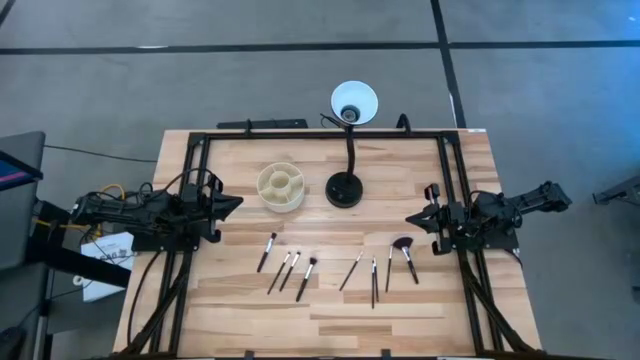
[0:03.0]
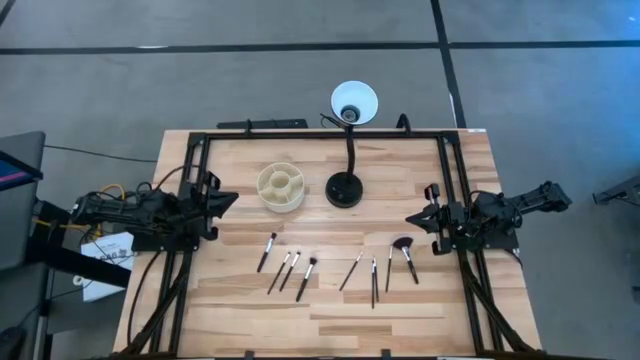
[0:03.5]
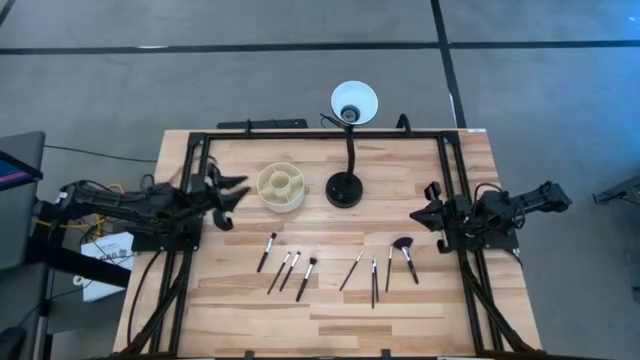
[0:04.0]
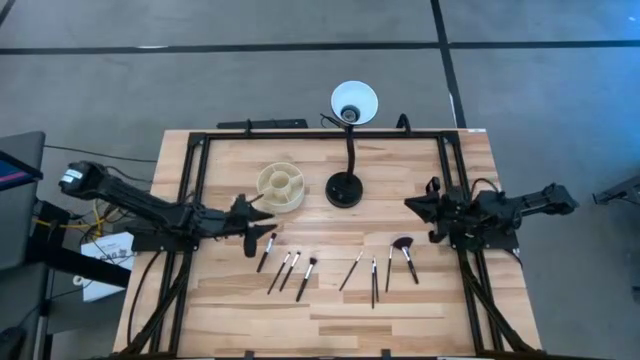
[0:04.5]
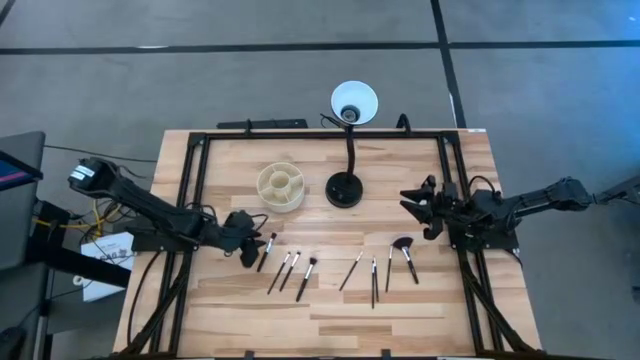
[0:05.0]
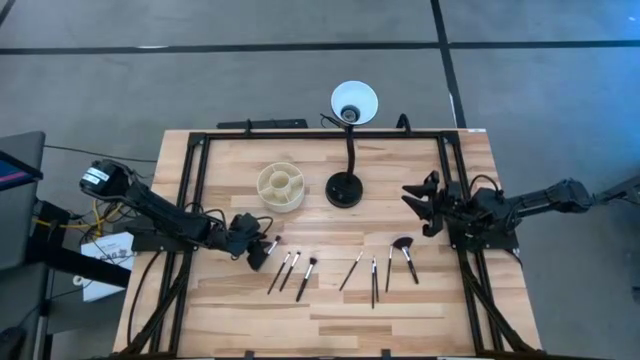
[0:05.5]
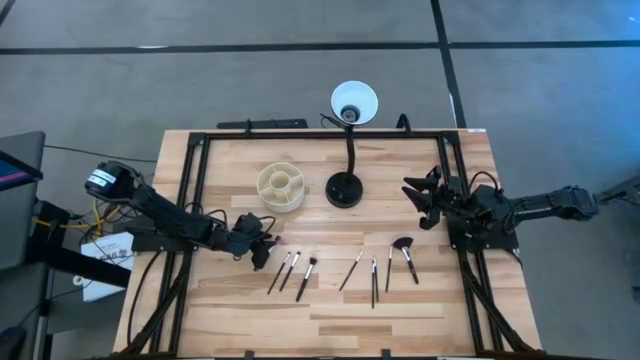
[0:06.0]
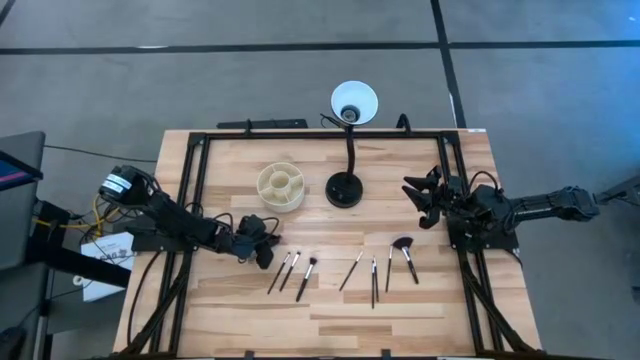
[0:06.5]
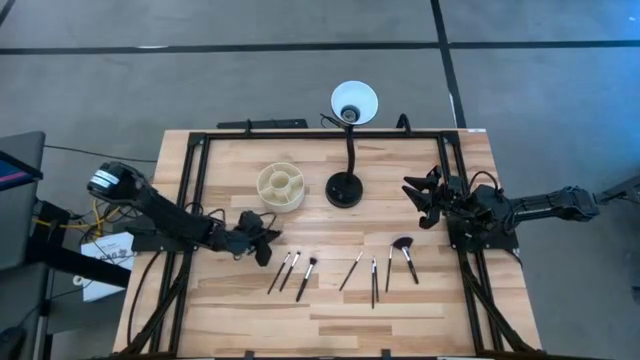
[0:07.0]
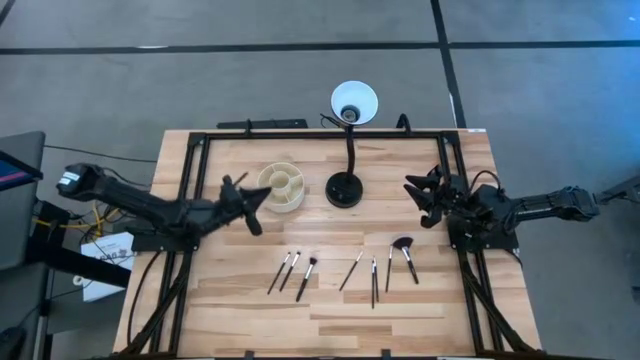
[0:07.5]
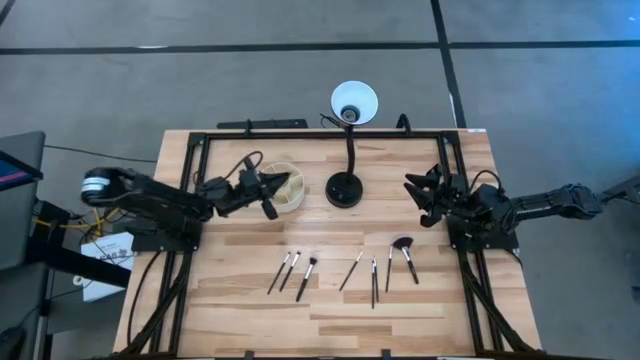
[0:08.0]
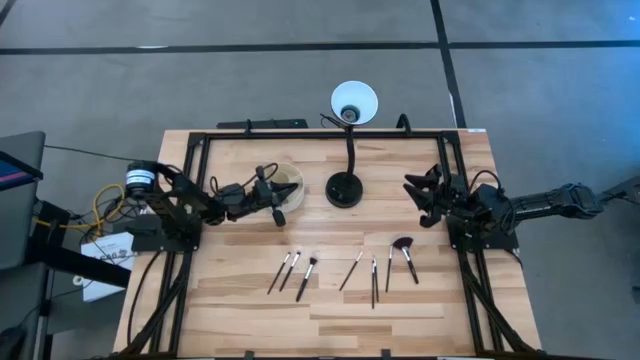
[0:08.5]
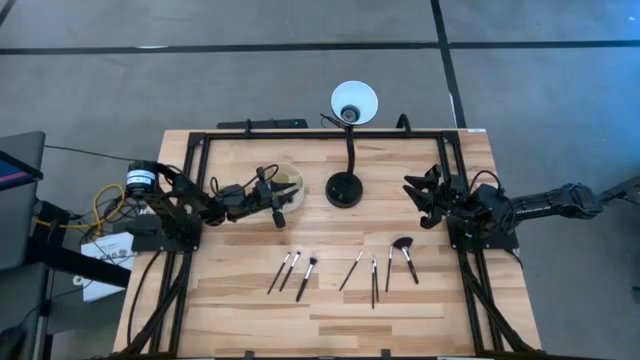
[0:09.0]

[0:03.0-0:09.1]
Task: Put items in baskets/containers
Put foundation brush into the pen organizer

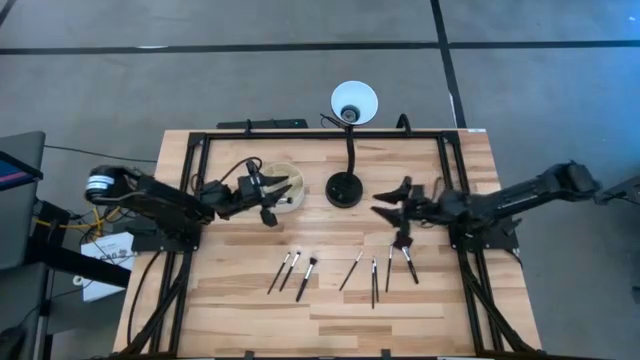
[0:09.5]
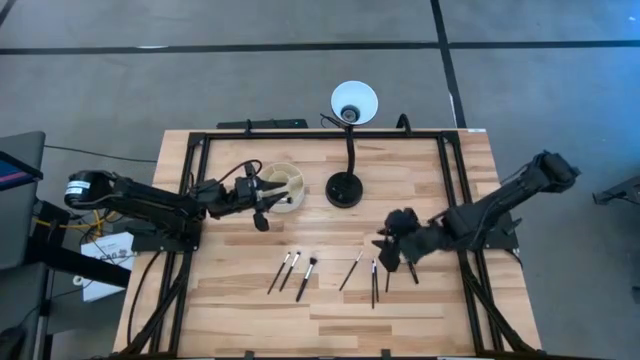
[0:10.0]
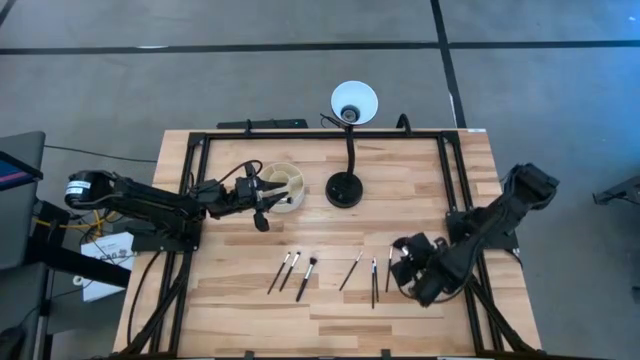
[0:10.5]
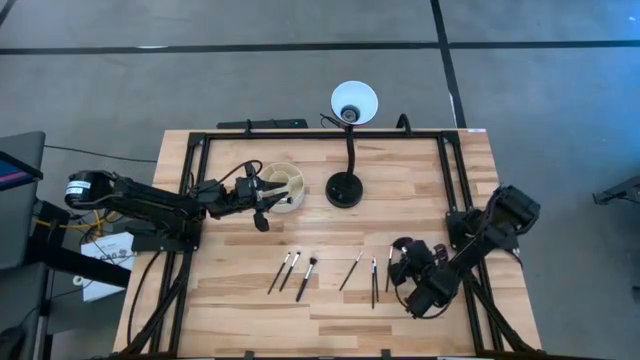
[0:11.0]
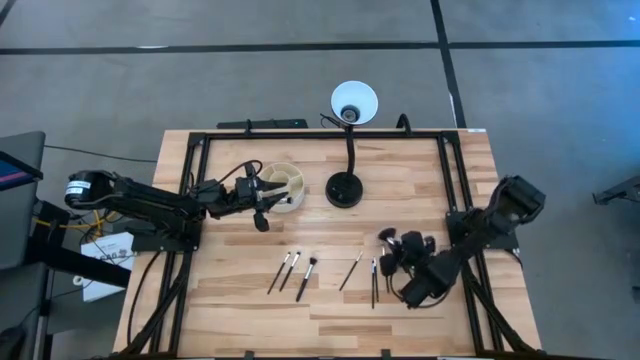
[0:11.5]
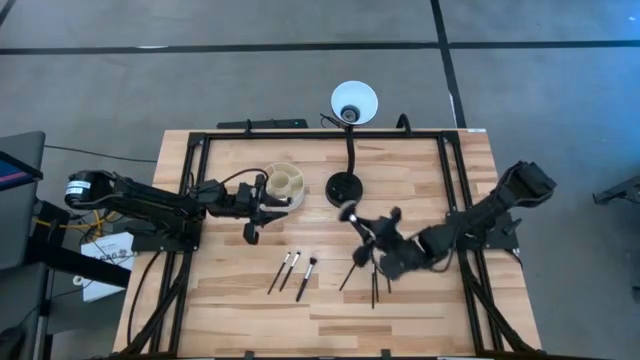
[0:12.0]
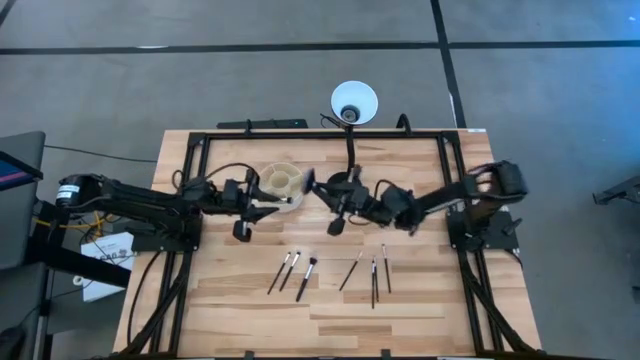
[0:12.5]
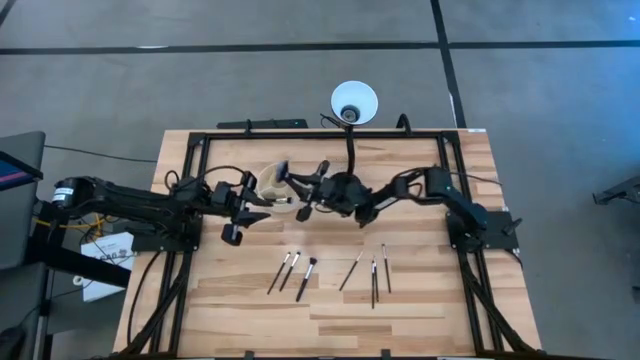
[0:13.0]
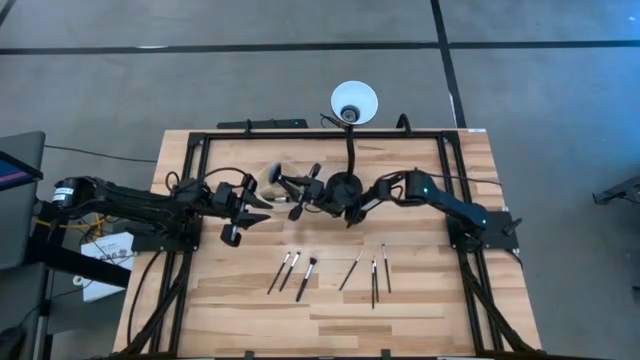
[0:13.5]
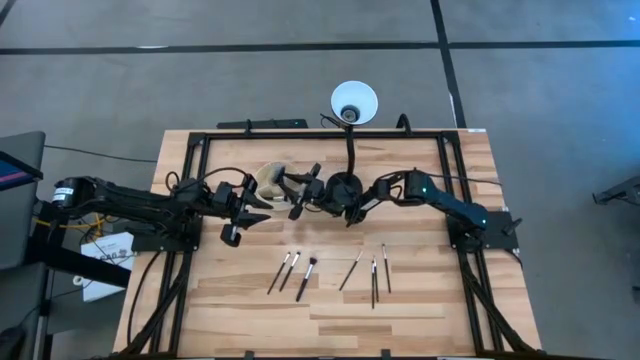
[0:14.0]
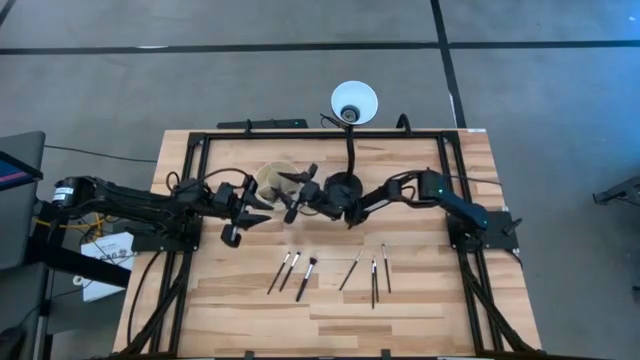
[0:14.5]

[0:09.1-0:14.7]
Put the highlighter brush into the organizer

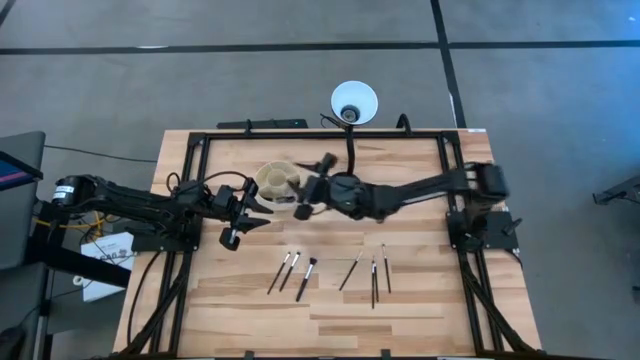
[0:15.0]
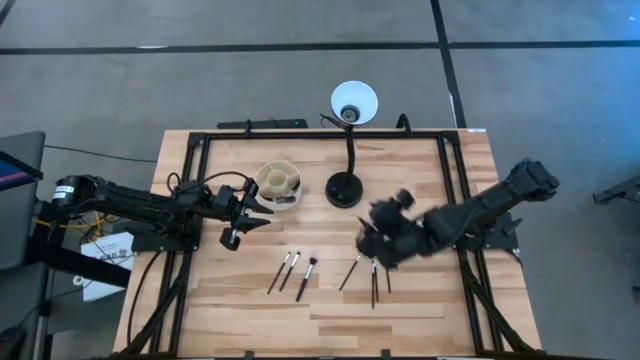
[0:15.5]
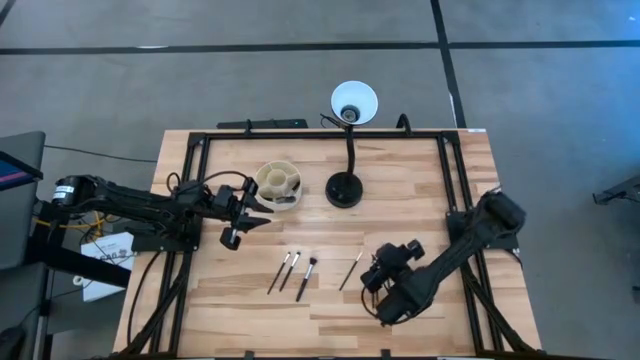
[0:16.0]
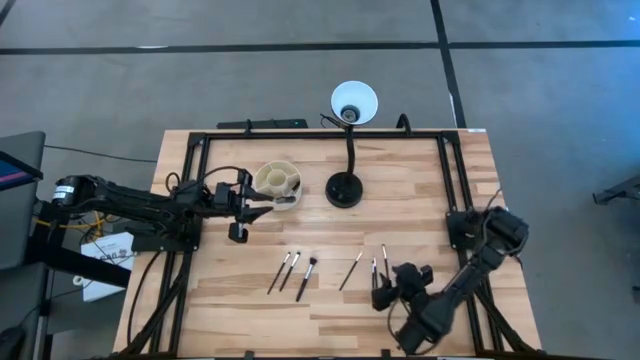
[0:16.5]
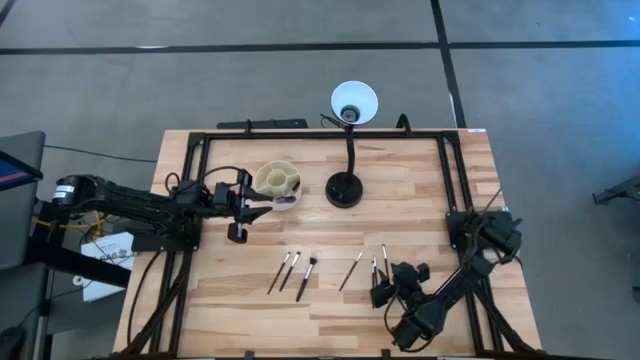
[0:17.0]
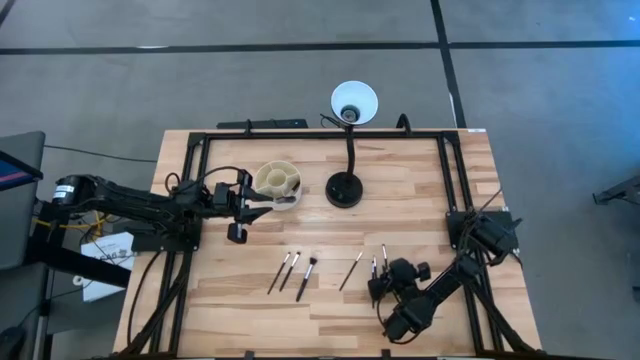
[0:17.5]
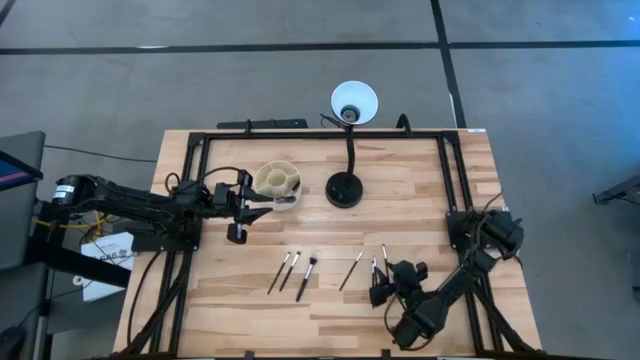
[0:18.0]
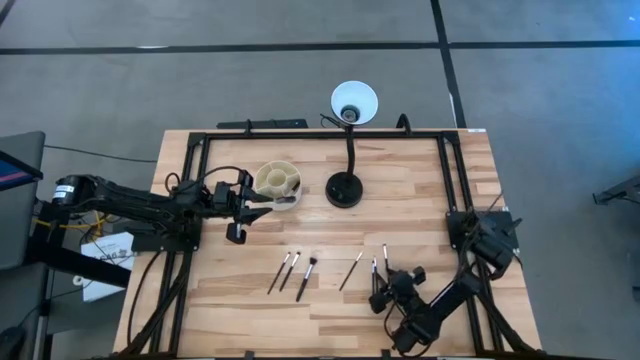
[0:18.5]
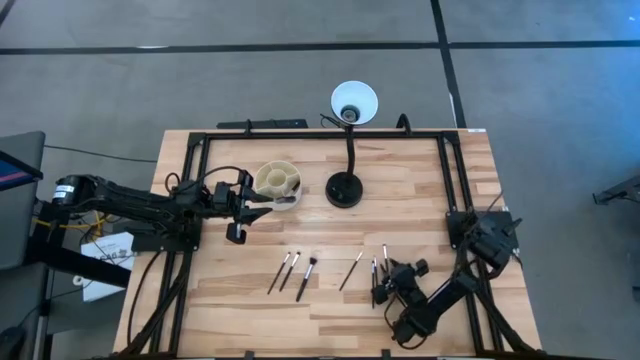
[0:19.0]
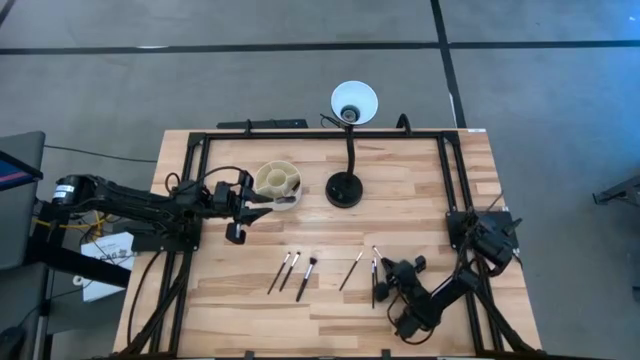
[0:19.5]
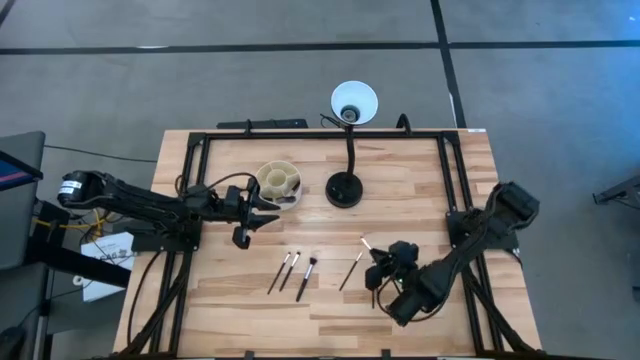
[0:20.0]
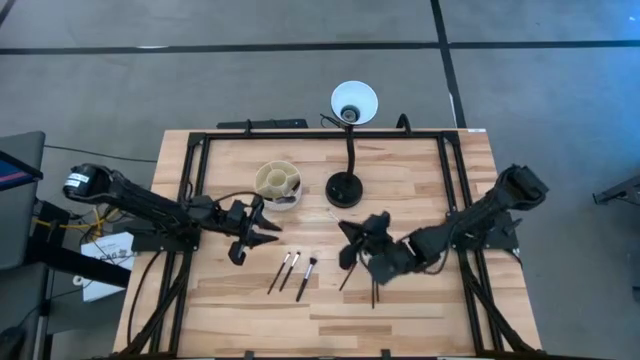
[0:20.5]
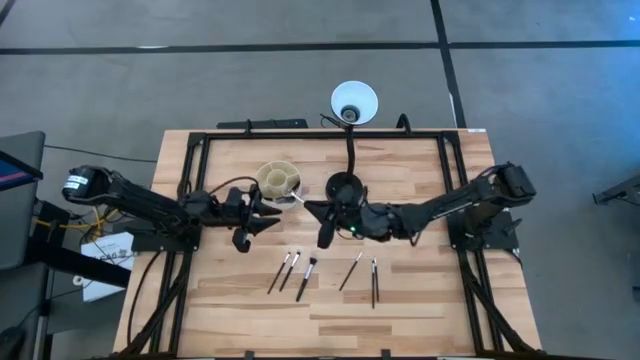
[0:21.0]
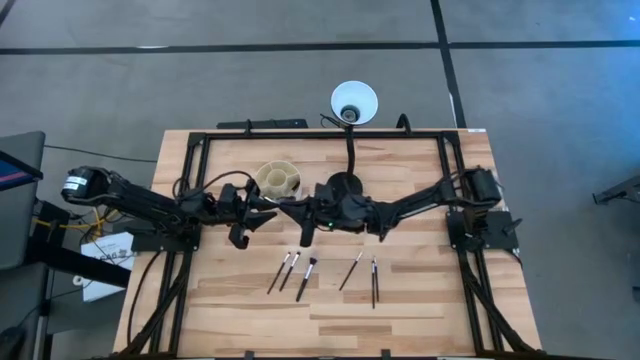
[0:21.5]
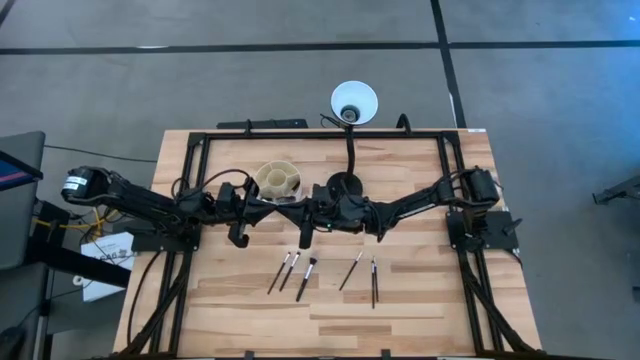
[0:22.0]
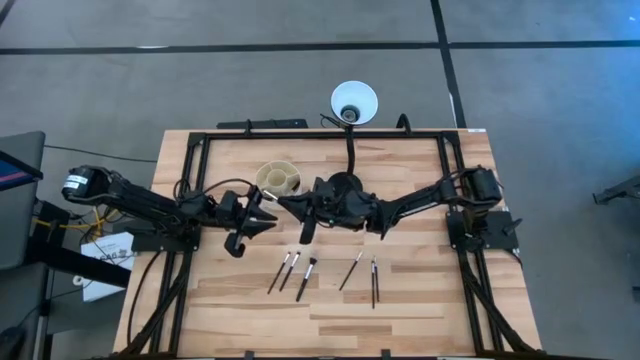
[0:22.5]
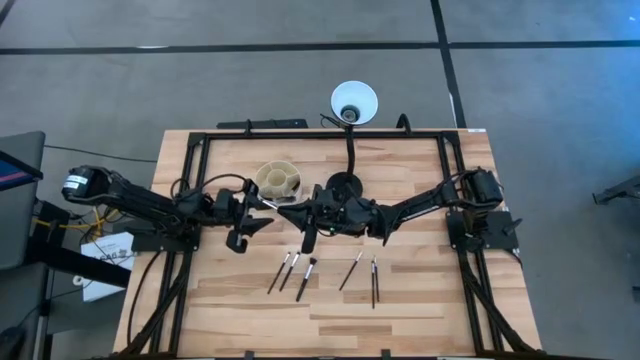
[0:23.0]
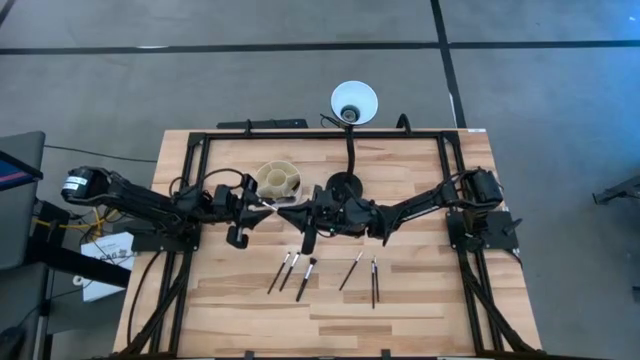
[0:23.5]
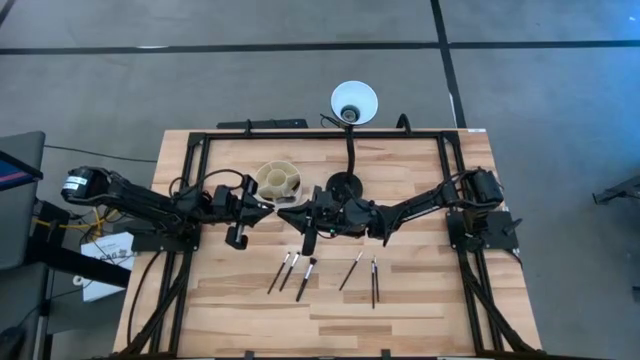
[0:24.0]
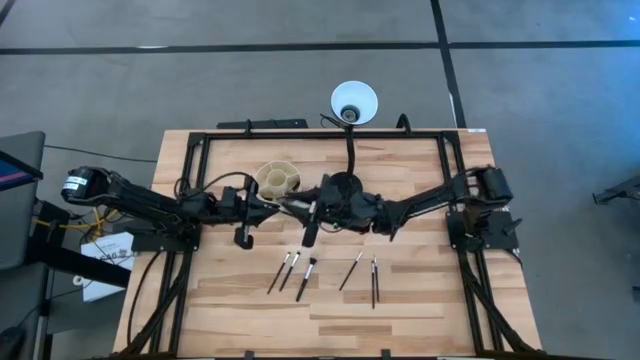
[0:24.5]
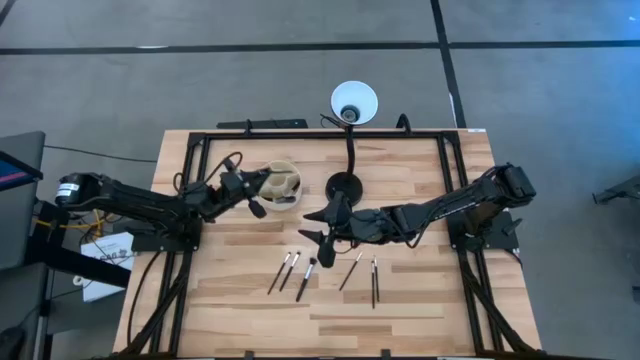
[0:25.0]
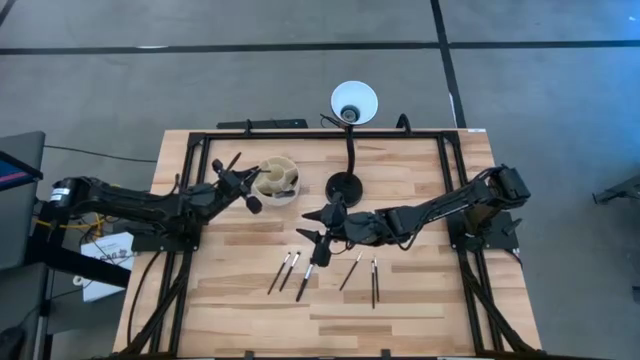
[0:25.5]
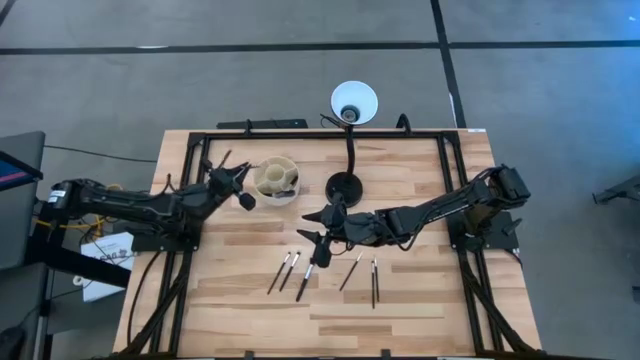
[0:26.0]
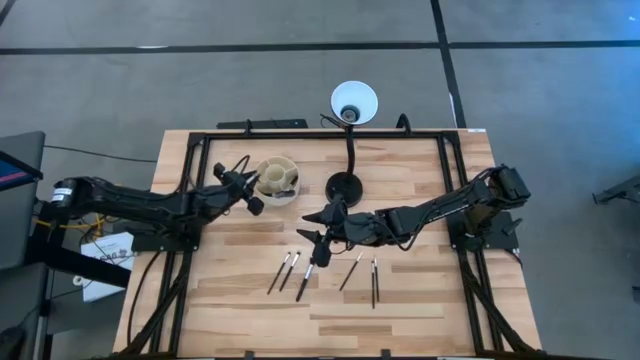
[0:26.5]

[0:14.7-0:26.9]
Put the eyeshadow brush into the organizer
